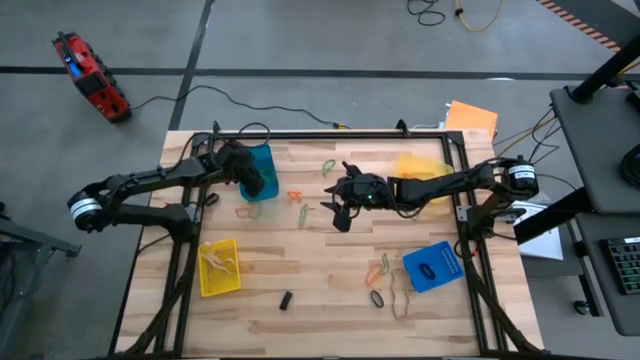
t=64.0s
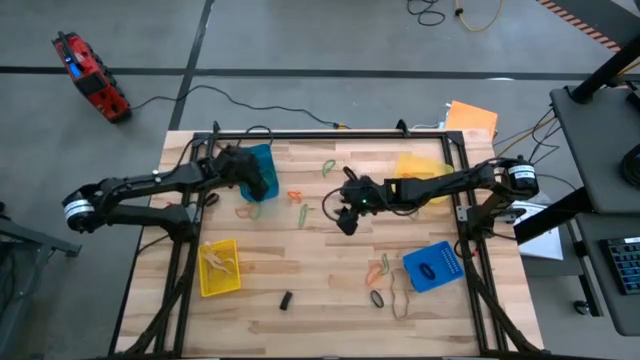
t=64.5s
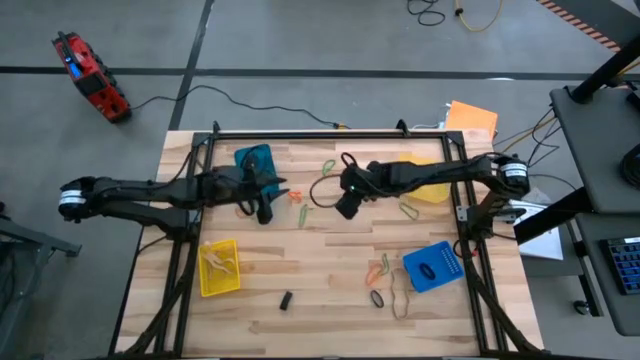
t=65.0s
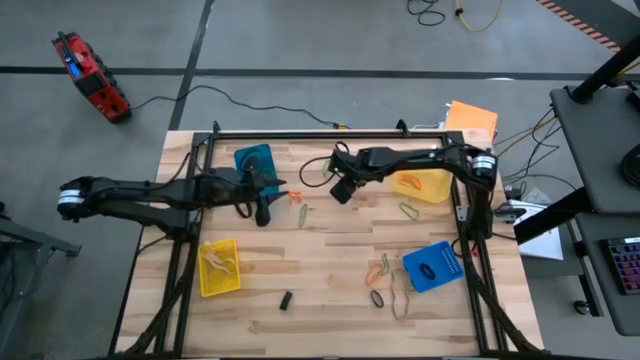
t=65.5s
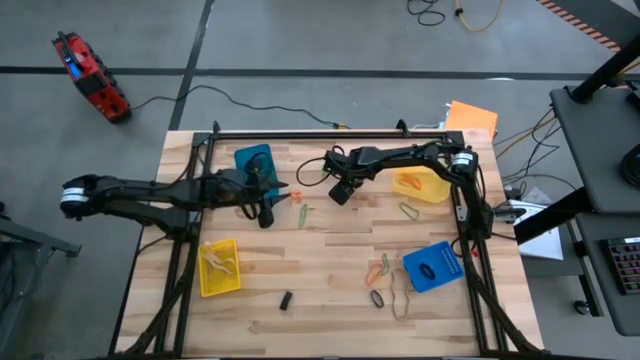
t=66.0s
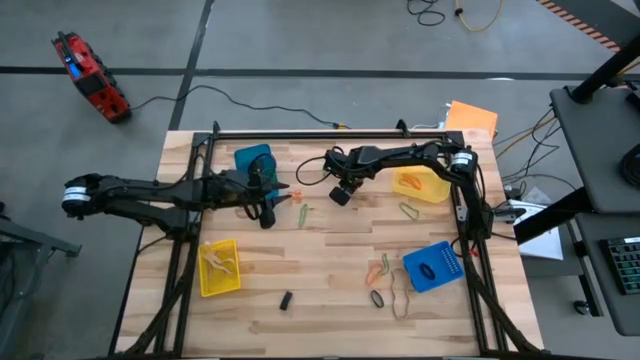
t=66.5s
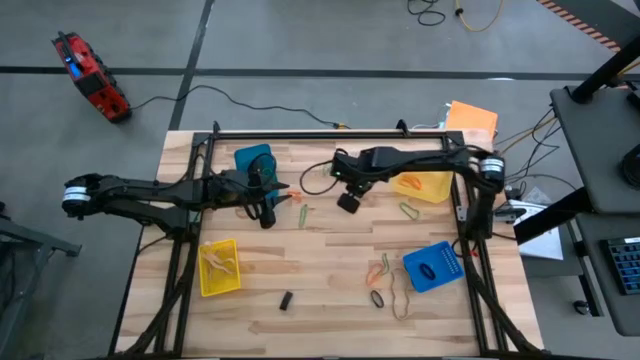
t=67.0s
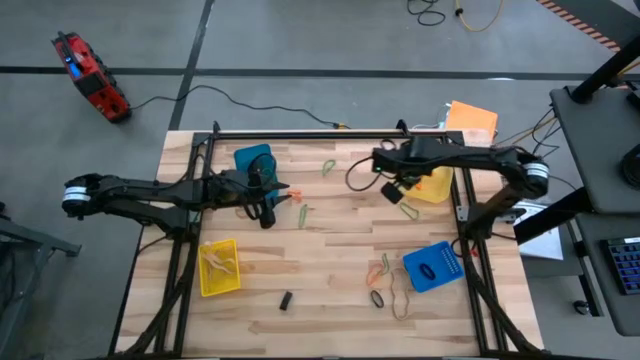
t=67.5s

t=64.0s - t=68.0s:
Task: Sort rubber bands into baskets
Put the orange rubber band into the light yellow bin

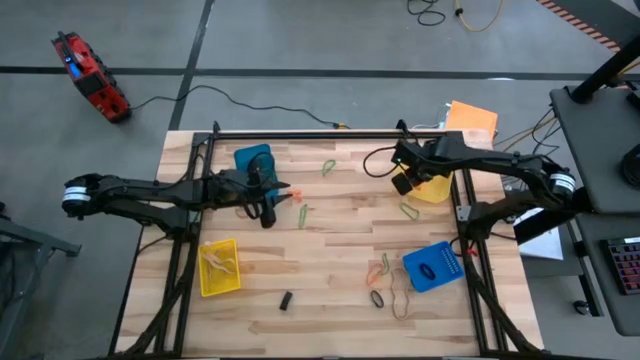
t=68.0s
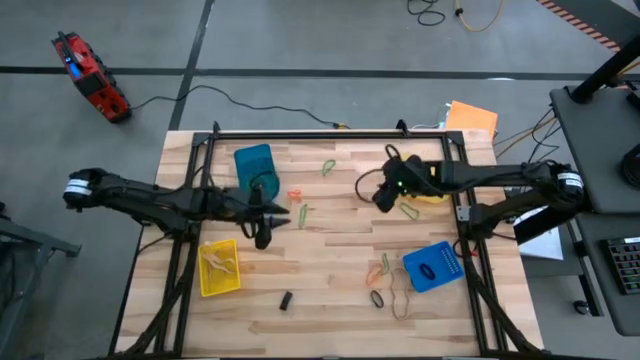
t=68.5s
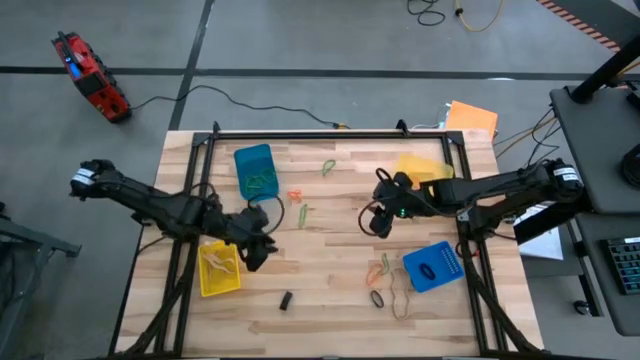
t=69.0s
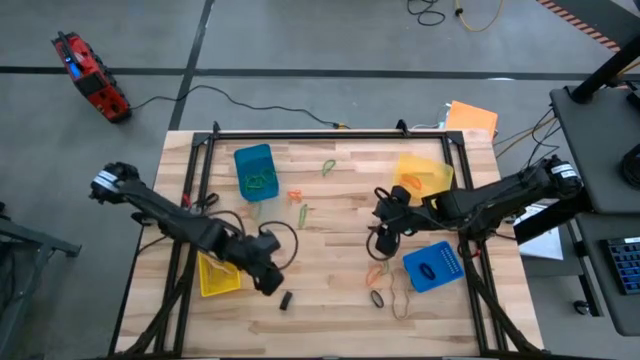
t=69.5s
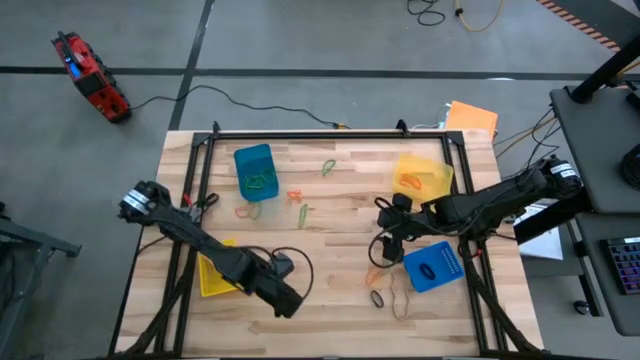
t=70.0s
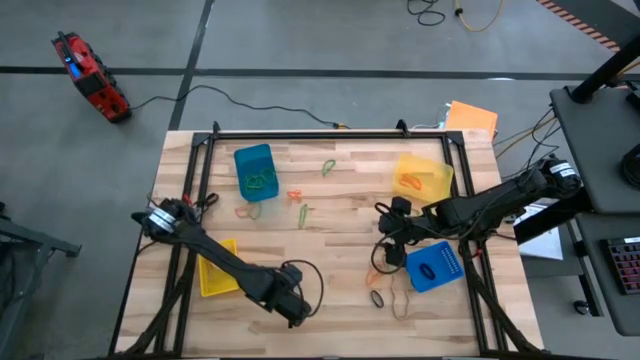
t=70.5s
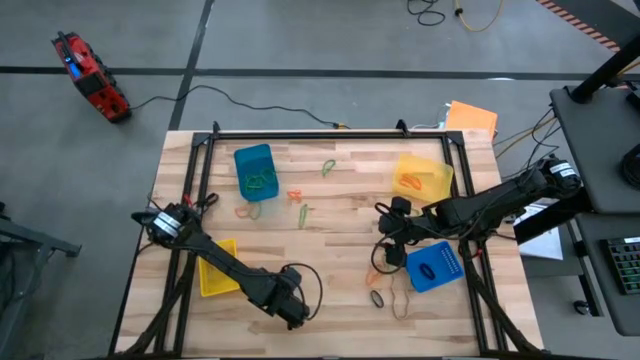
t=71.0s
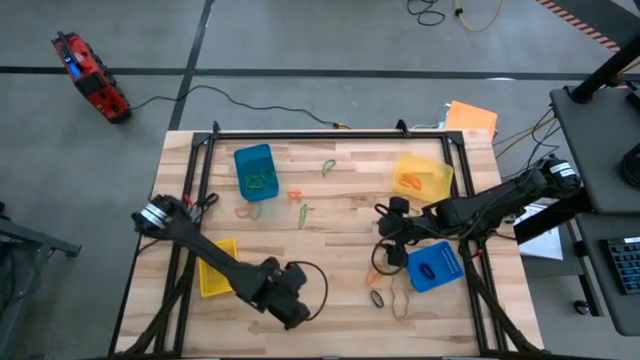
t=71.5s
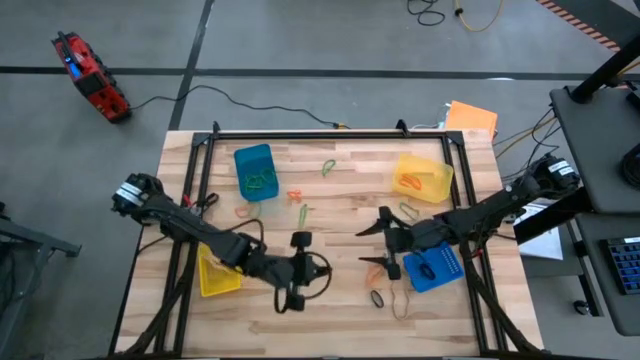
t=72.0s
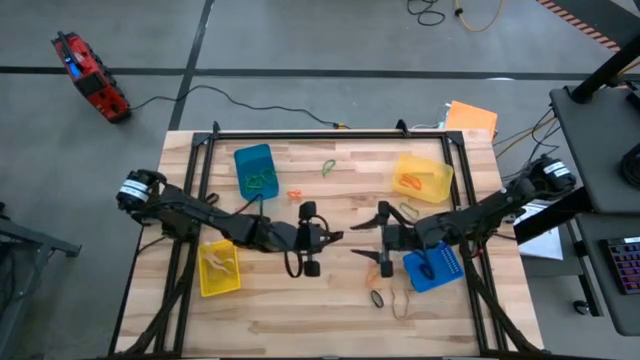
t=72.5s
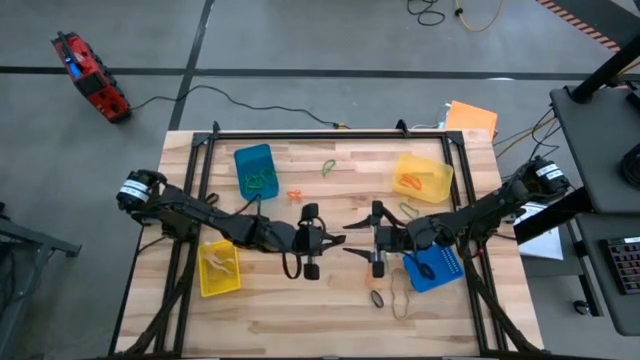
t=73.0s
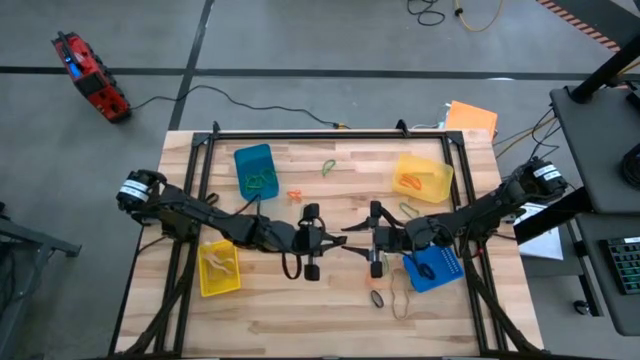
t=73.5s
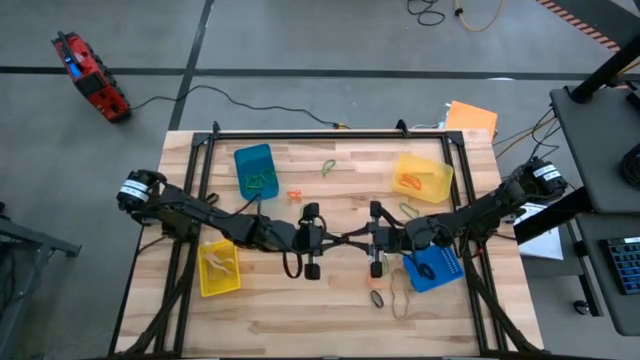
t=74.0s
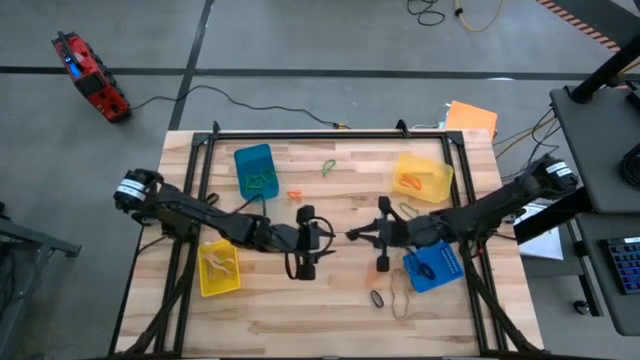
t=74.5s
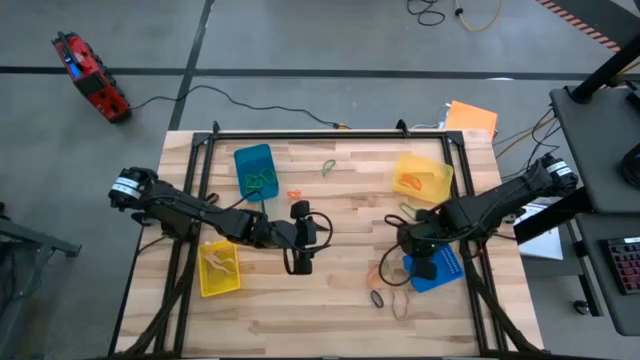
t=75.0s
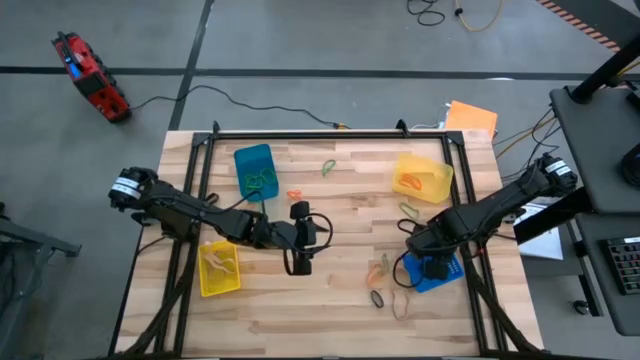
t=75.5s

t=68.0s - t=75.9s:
Put the black rubber band into the bottom blue bin

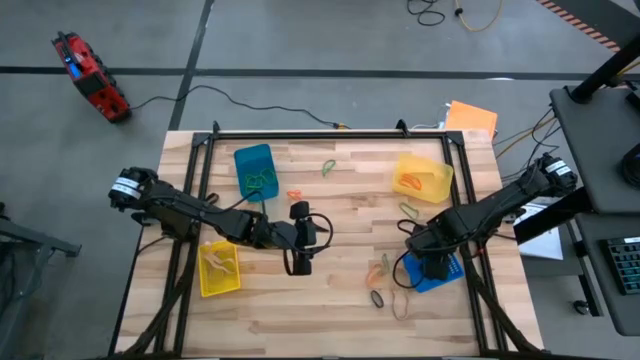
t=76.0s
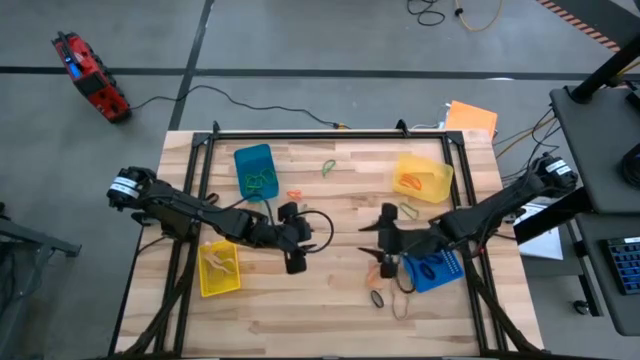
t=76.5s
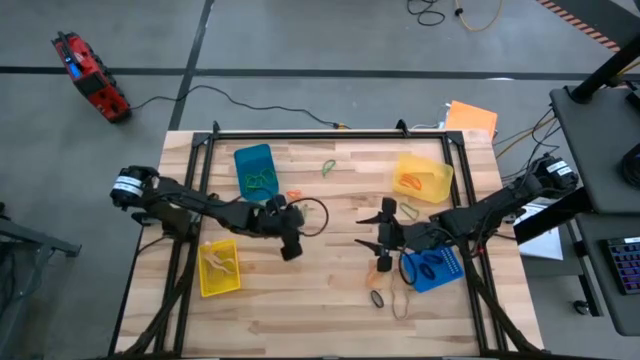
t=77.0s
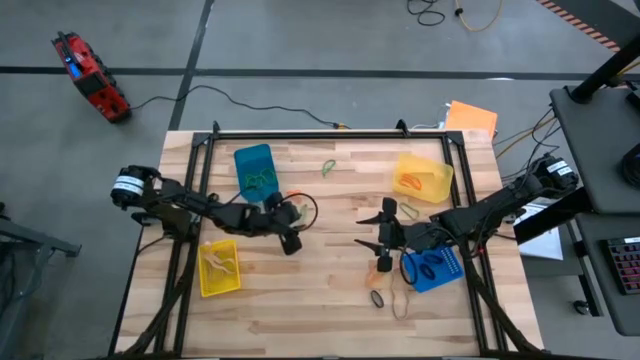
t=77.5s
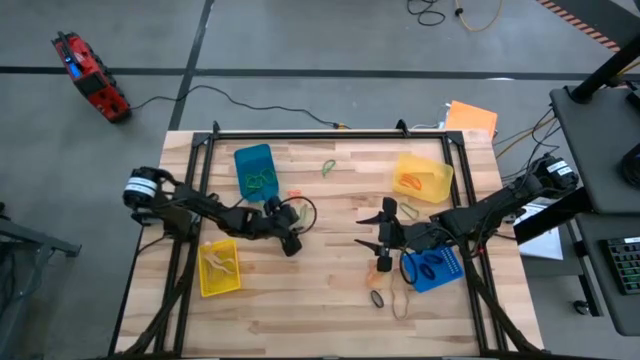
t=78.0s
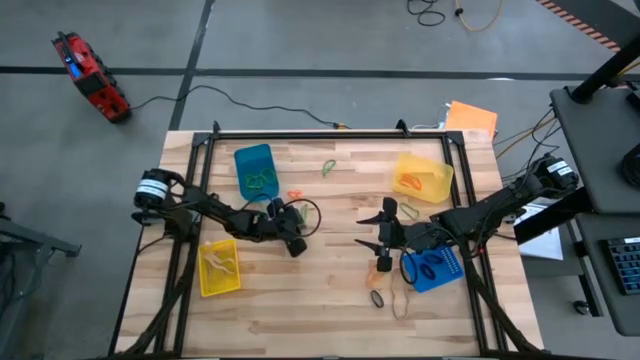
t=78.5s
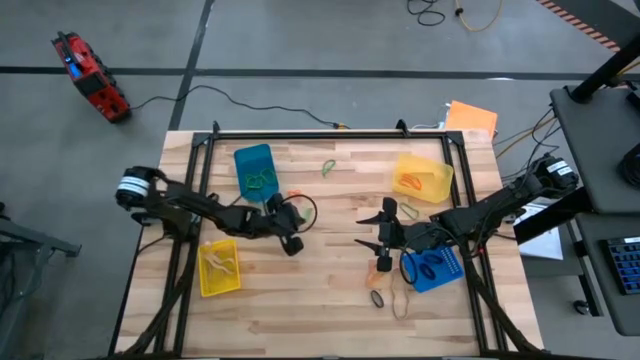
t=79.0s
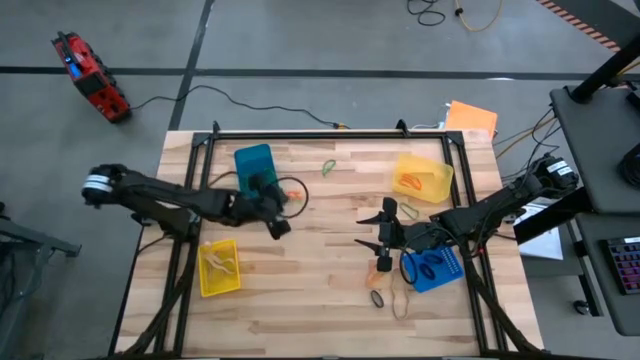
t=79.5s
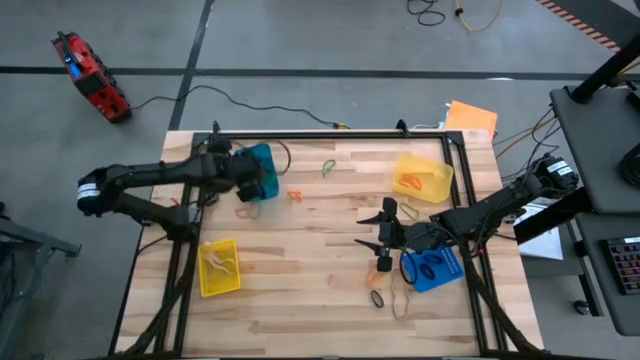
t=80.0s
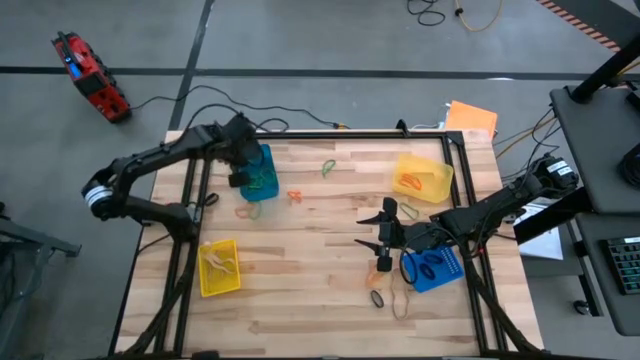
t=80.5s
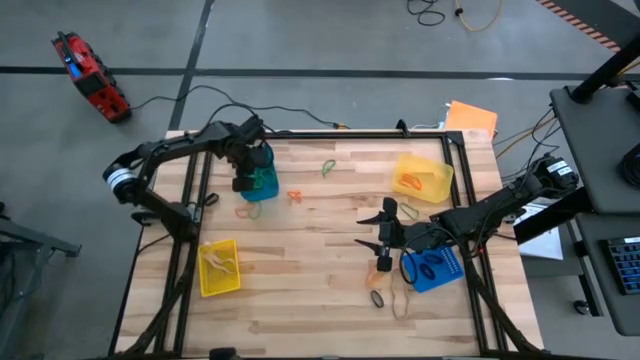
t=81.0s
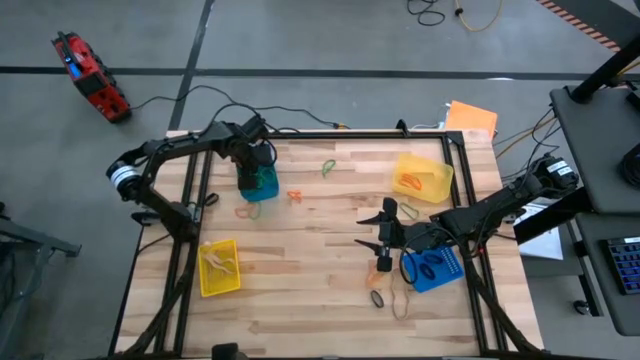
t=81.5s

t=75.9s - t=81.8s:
Put the green rubber band into the top blue bin

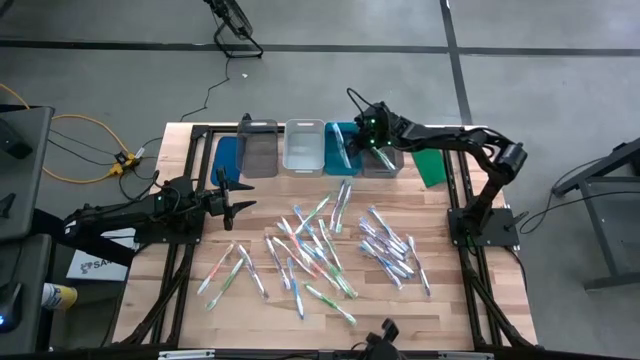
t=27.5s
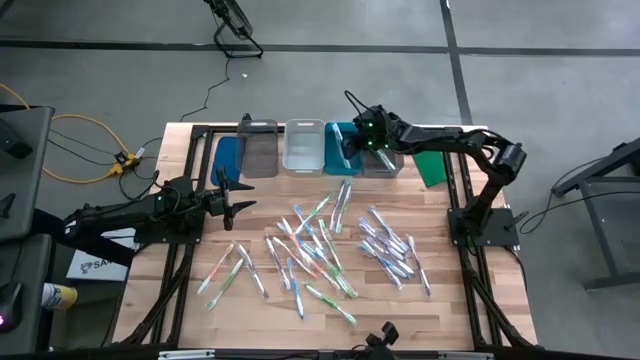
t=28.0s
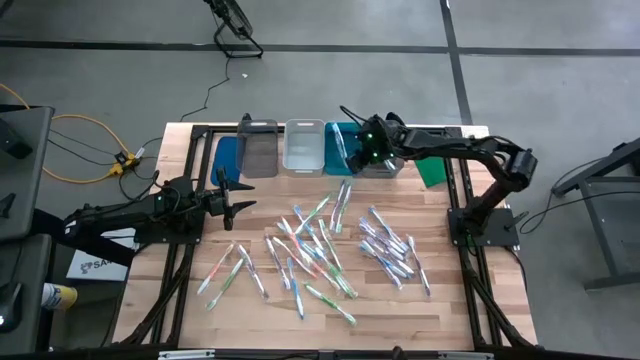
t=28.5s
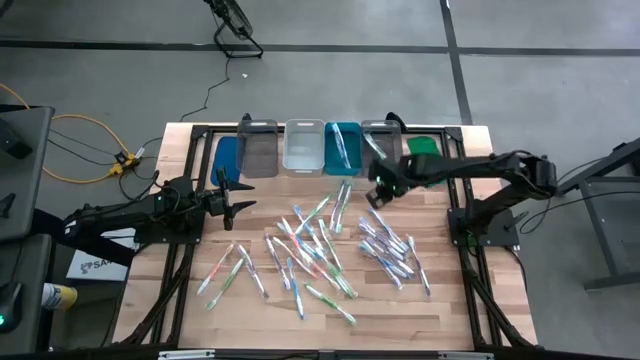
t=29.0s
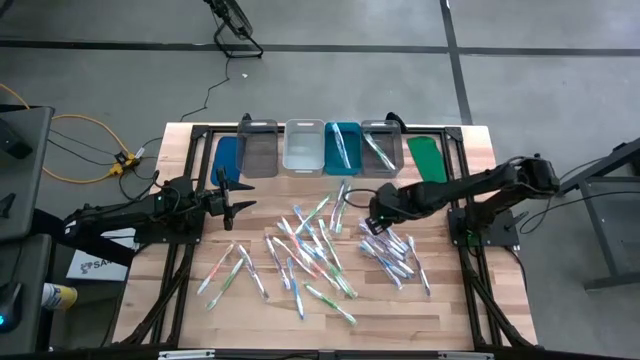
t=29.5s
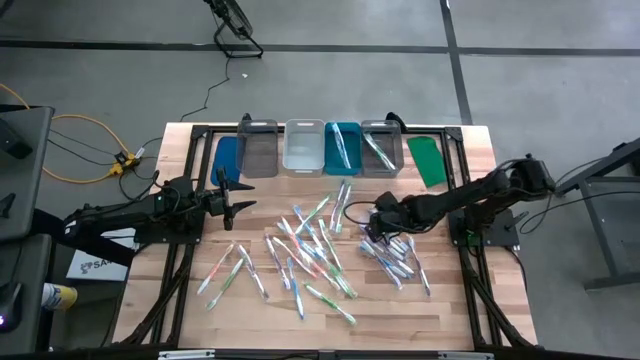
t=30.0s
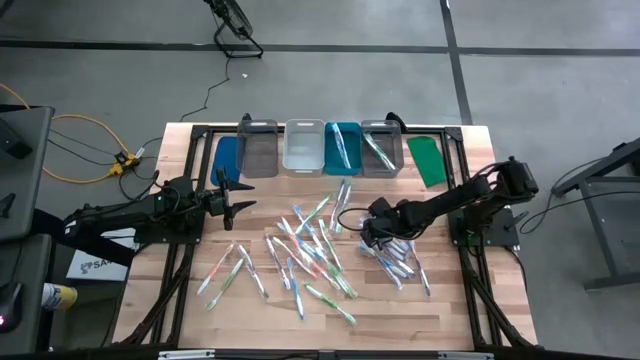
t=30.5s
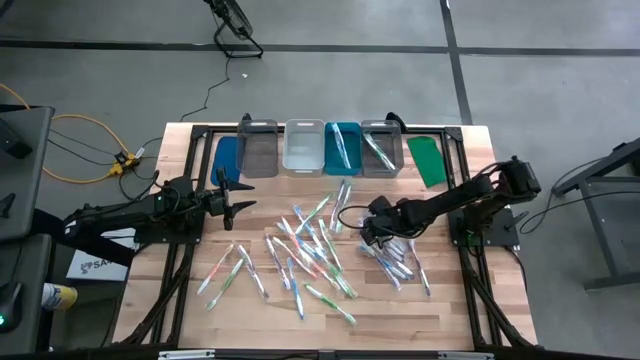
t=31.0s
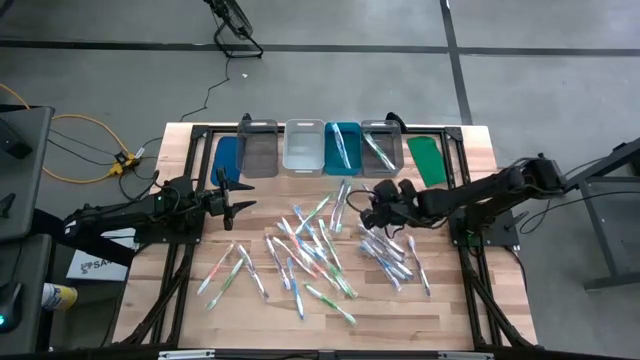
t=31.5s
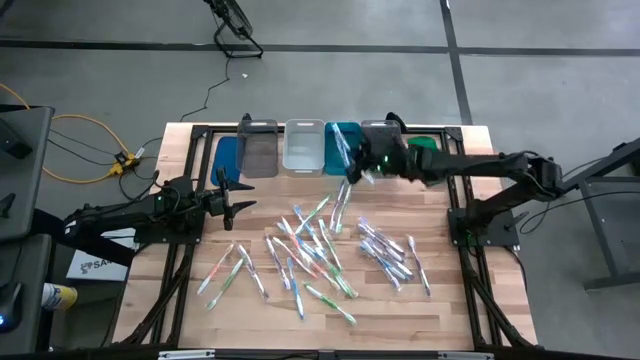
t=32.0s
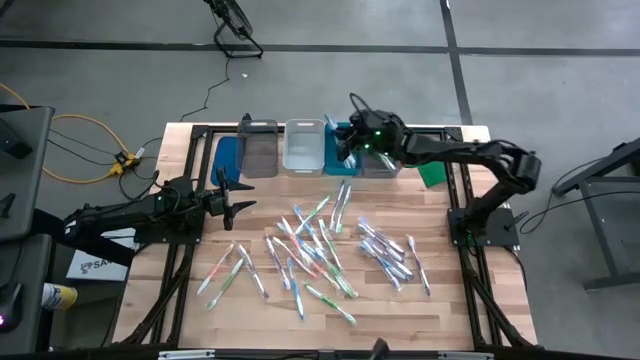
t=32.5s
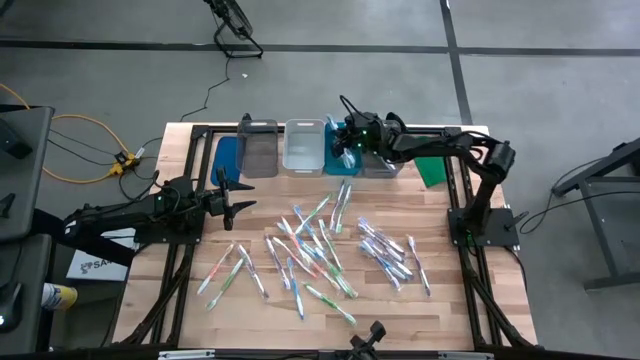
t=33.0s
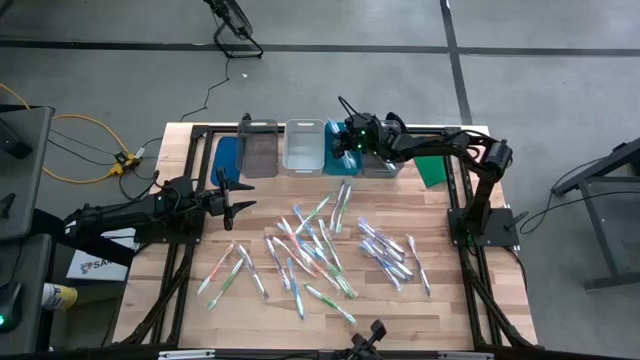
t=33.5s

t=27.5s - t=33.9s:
Task: Pick & Place Toothbrushes
Put the blue toothbrush into the blue bin
